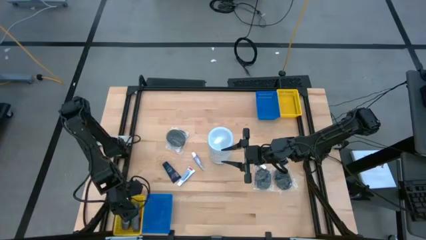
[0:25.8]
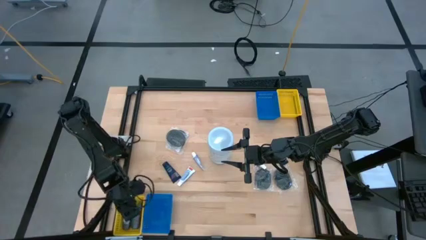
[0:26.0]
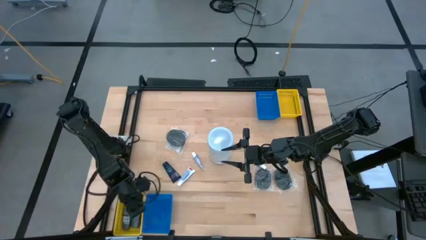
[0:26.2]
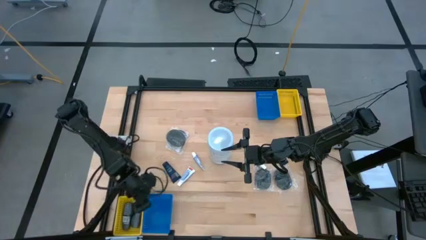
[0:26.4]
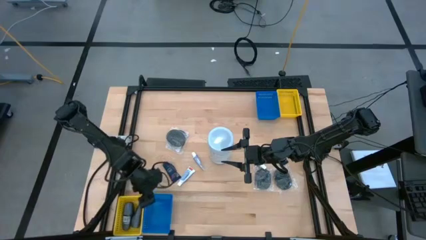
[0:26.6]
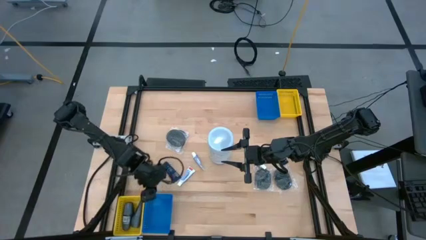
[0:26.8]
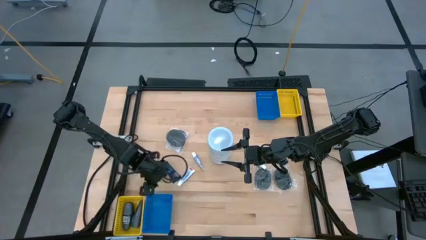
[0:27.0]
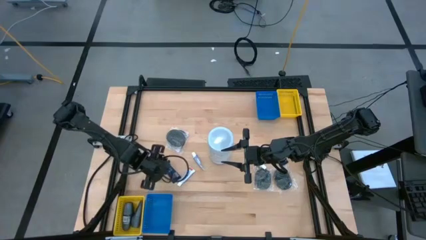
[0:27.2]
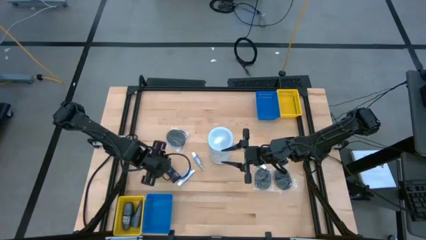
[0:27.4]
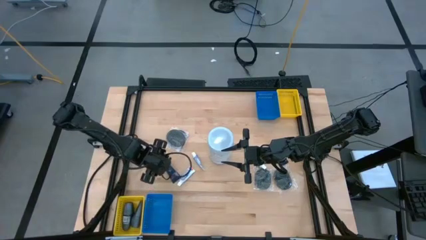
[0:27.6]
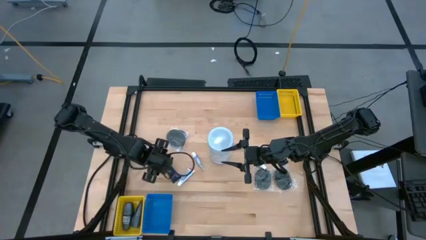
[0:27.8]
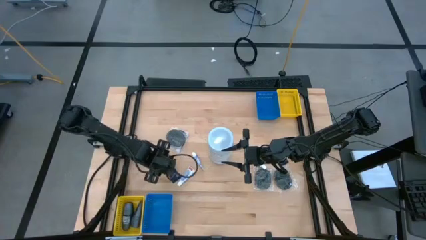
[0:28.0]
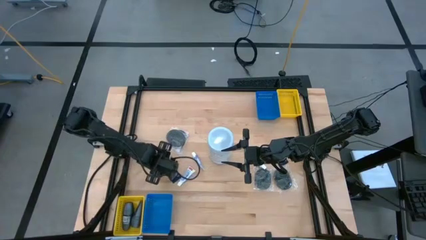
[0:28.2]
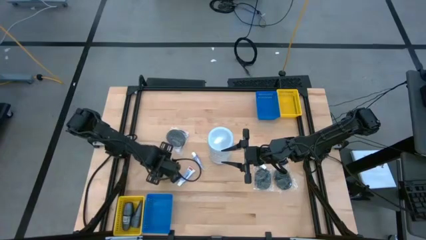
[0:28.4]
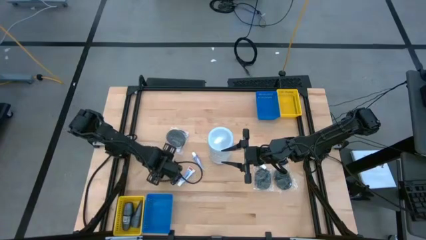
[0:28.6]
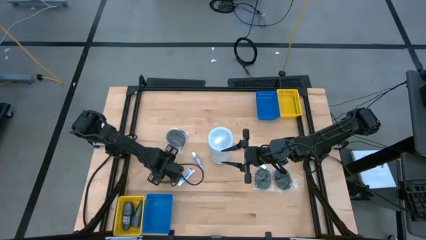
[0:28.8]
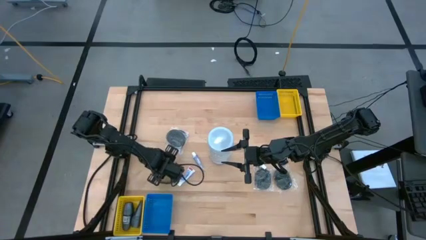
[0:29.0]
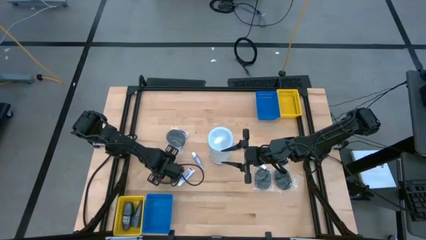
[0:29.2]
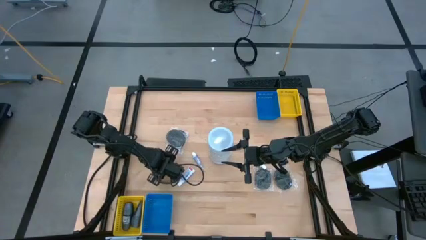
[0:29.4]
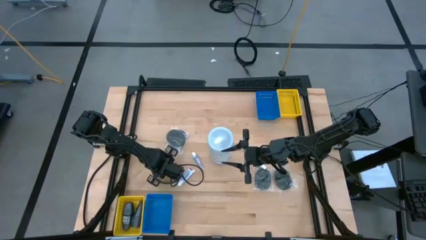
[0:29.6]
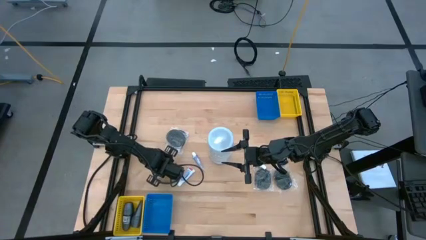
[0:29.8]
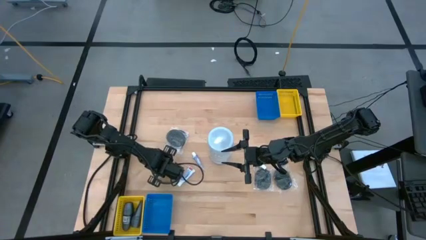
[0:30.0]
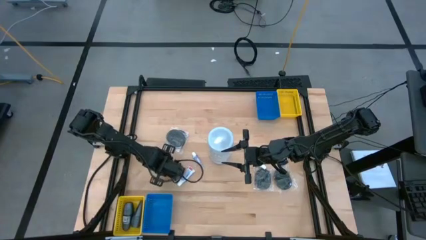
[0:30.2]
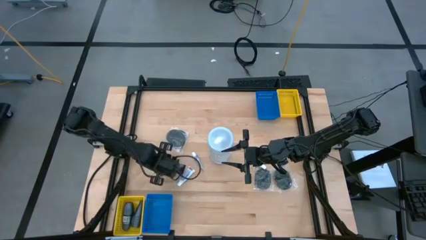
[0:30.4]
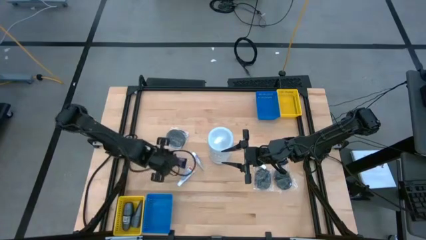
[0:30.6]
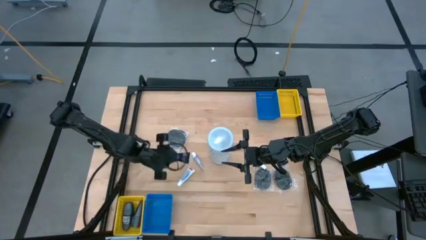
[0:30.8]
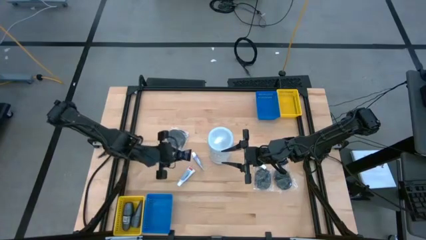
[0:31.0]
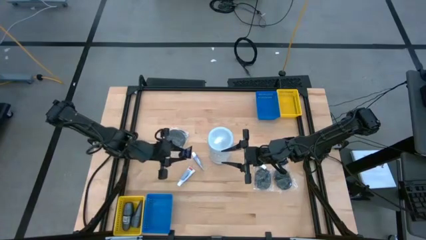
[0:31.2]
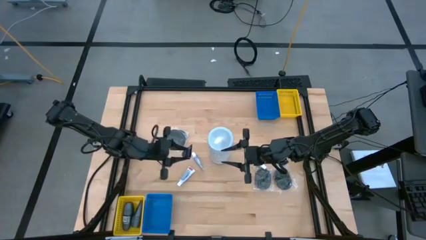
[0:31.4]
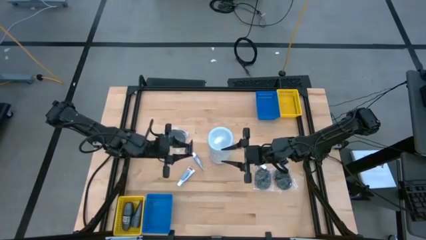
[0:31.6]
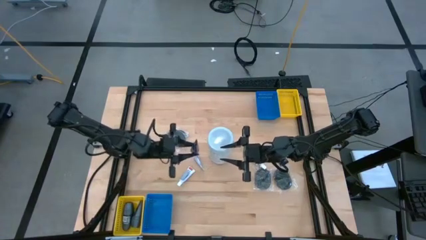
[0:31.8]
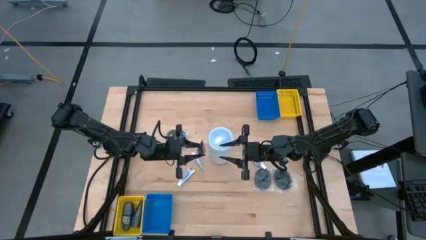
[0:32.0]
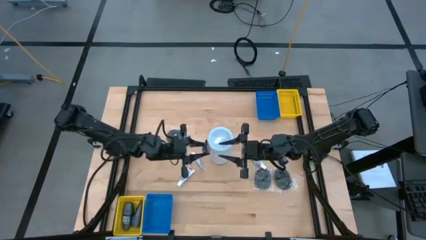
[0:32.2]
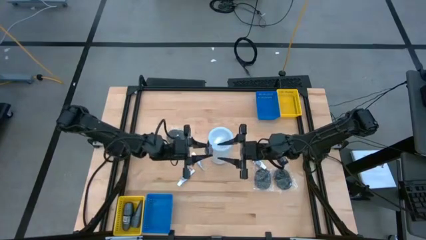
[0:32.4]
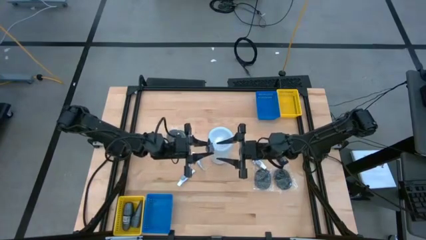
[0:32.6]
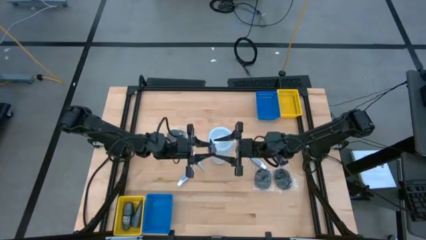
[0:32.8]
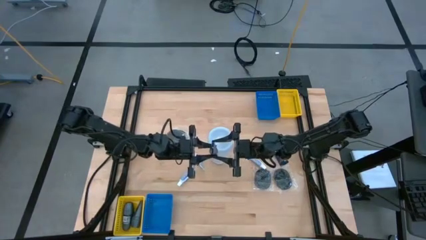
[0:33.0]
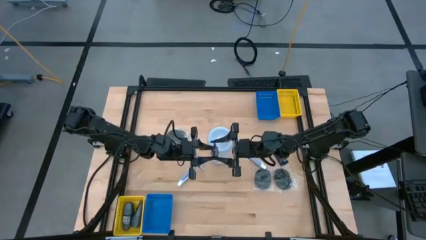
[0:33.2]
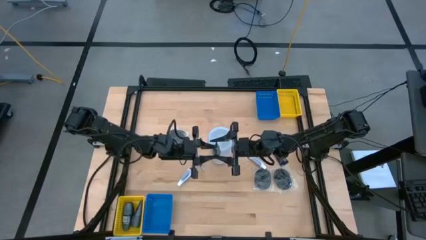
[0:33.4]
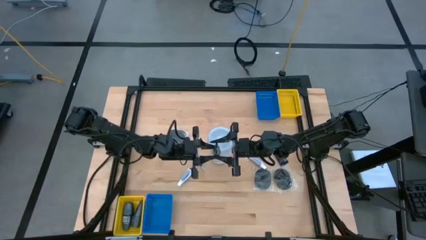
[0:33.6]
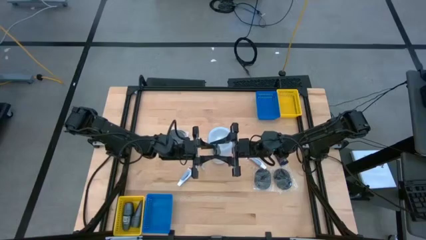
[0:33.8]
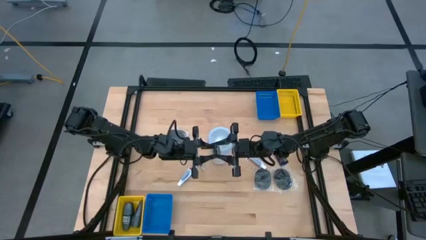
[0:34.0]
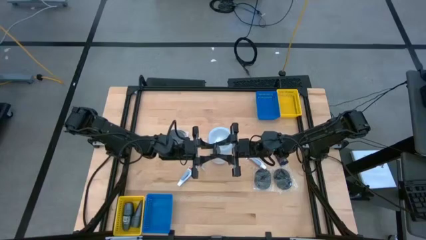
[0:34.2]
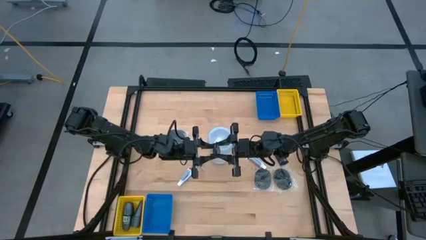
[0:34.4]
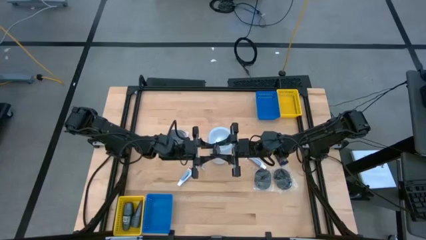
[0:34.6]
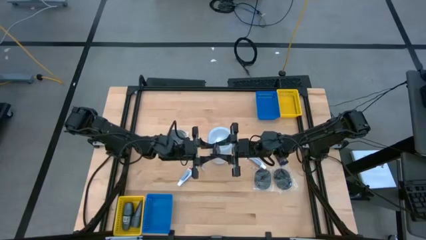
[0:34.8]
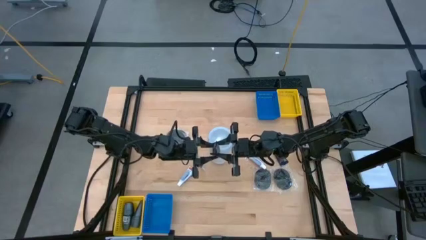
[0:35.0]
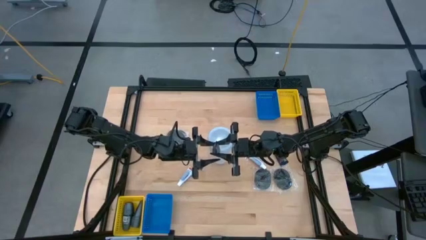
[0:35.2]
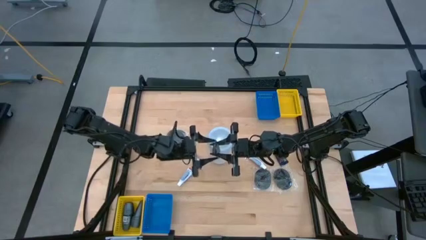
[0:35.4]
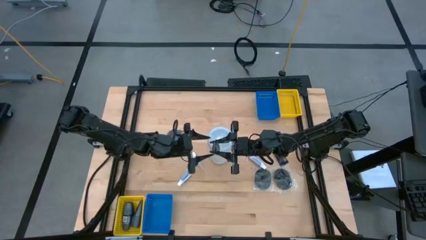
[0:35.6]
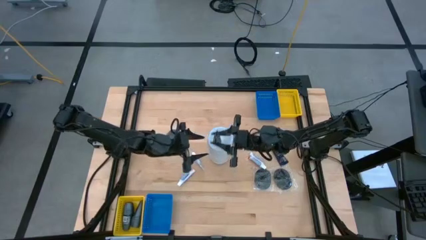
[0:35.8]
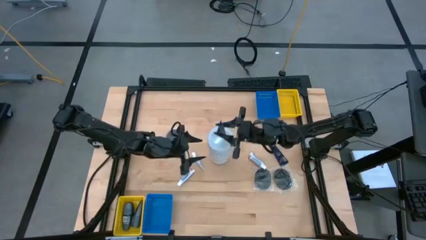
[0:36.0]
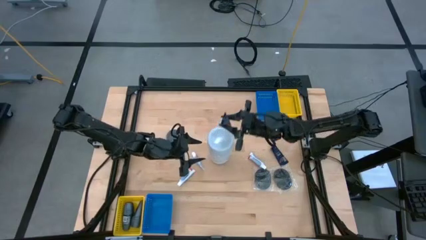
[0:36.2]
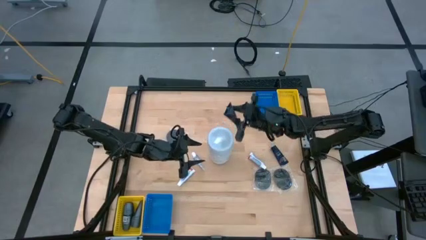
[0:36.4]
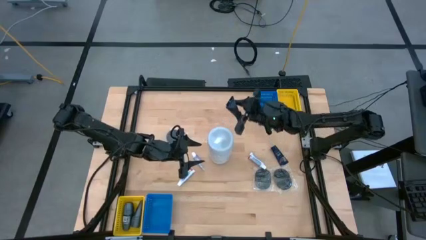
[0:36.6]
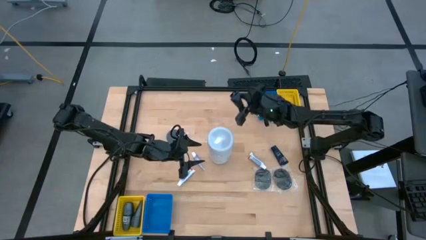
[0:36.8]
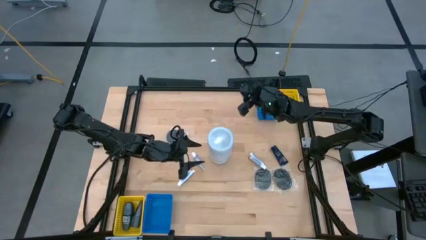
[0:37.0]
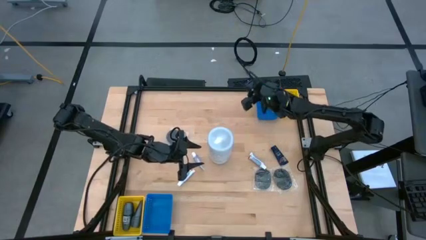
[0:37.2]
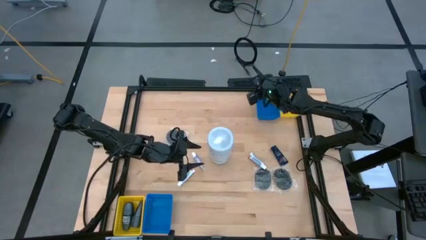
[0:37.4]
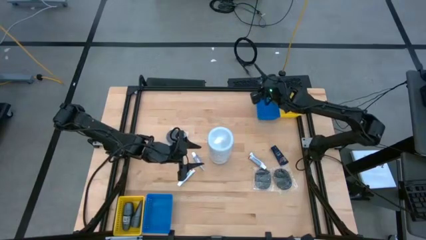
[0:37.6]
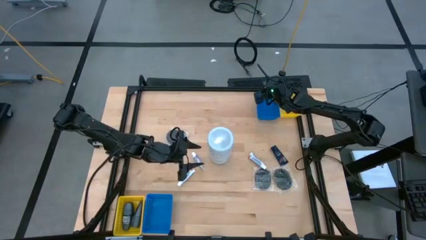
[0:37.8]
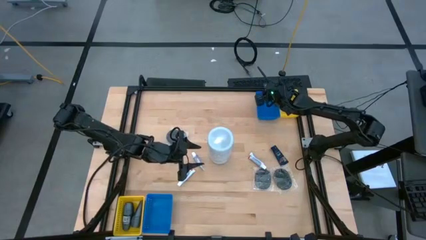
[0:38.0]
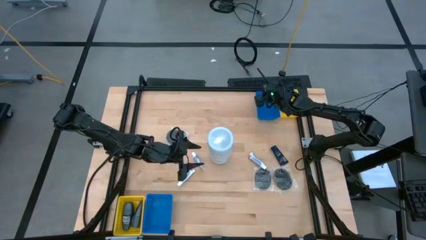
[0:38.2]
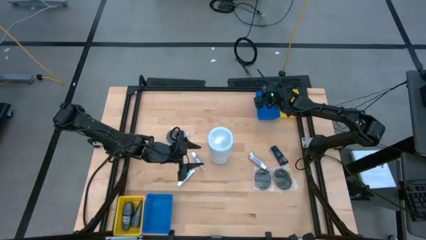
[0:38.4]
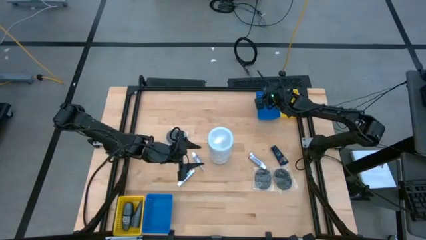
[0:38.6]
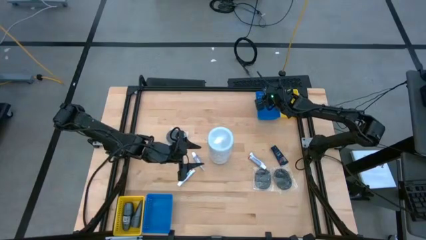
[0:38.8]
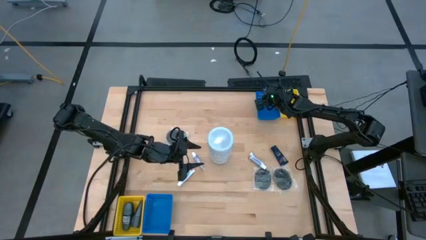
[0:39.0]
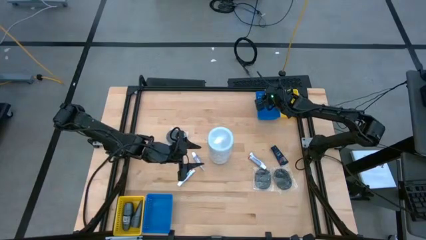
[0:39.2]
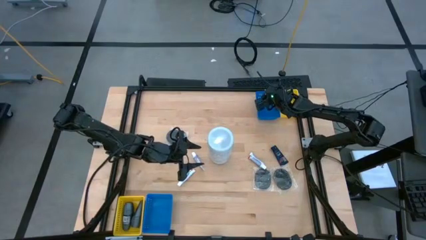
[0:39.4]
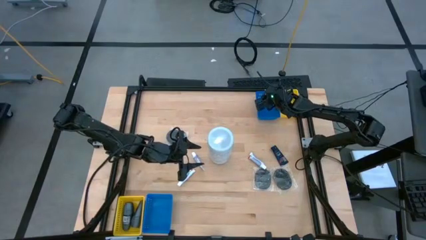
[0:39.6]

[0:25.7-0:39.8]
Task: Pick & Place Travel size toiletries
Put the left blue shave cream into the top blue bin

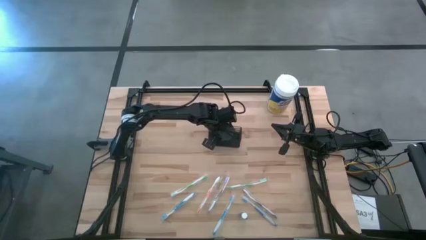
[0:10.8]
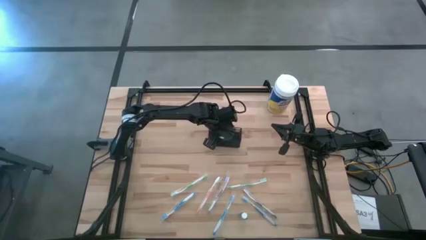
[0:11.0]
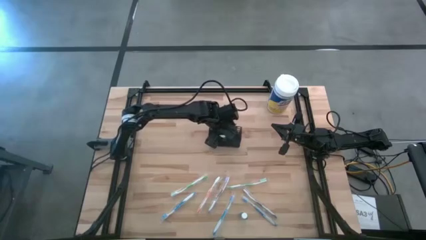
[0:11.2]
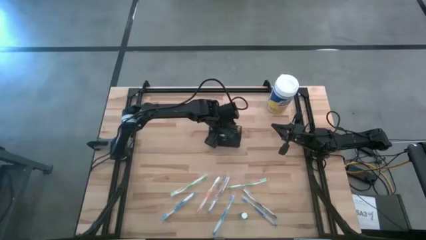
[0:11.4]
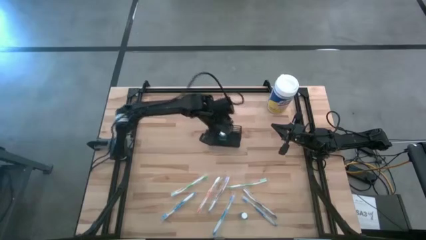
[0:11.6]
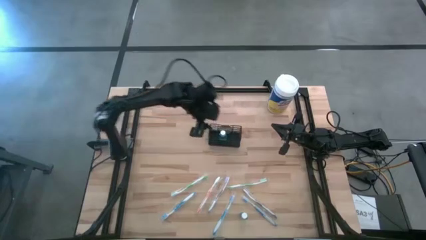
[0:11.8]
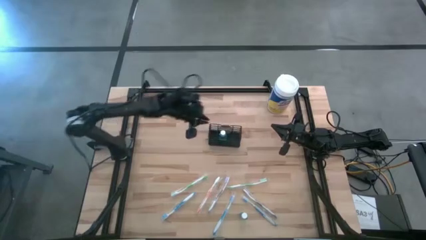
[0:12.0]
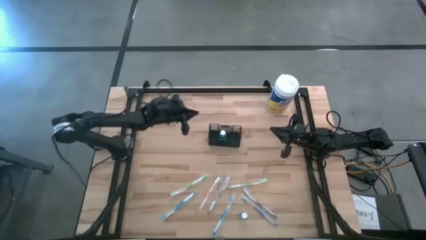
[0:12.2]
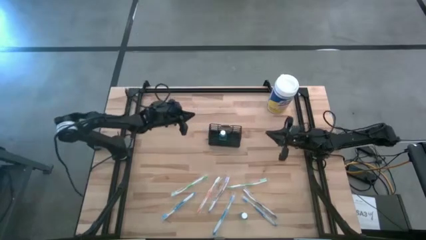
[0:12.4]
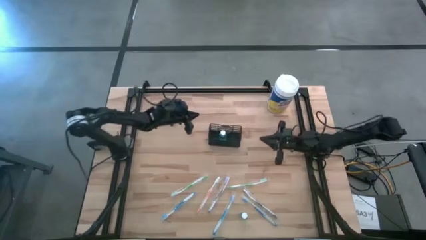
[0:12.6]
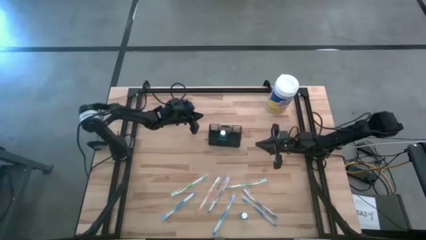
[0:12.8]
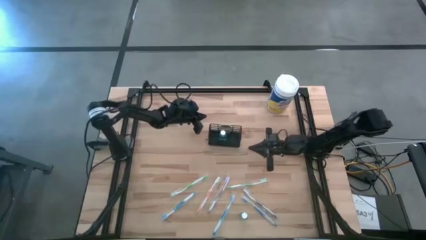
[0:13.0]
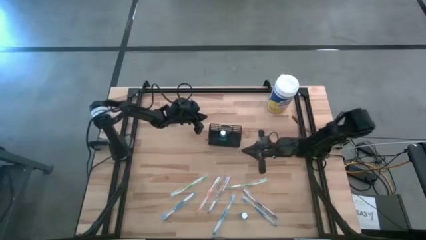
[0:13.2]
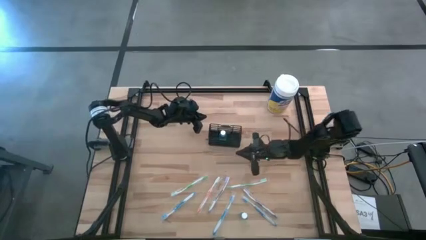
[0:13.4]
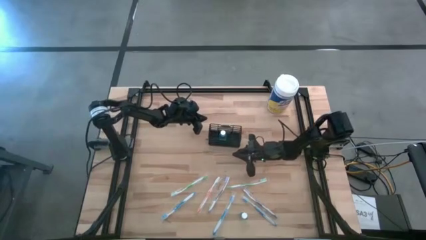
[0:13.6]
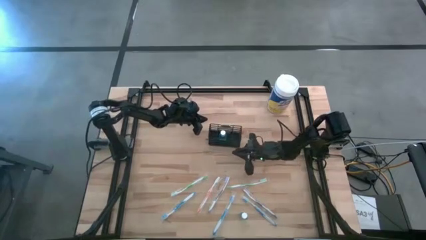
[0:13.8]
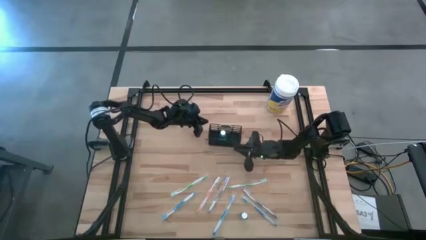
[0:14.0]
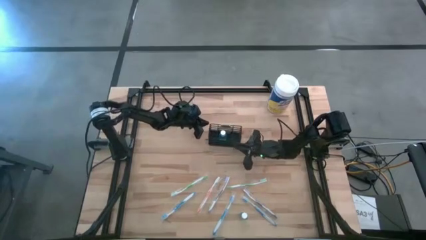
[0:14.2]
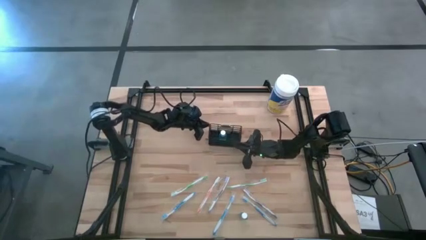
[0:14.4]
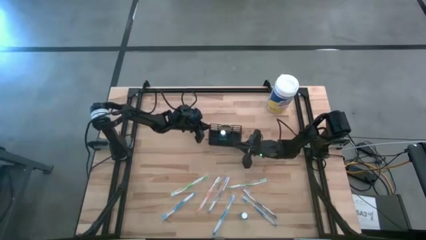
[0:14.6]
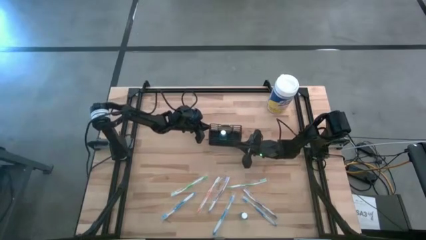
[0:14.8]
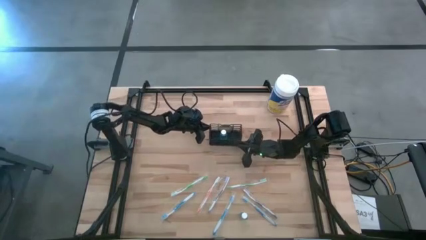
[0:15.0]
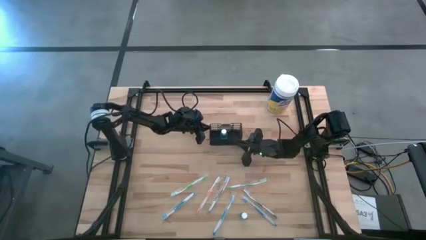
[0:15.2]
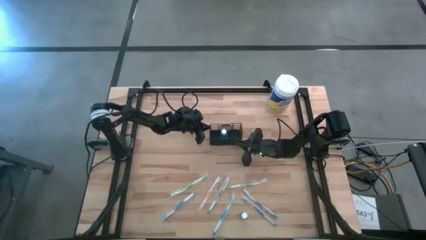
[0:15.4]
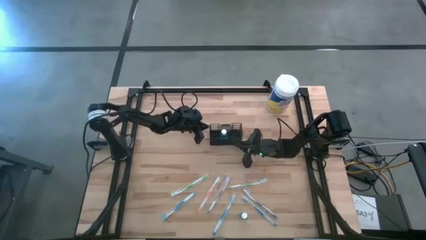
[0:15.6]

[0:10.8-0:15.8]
Task: Pick & Place toothbrushing station
Adjust the black wire organizer
